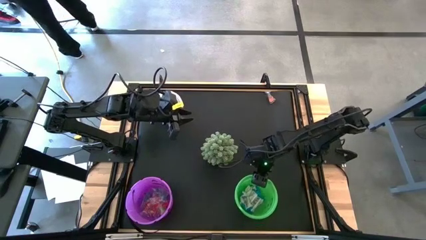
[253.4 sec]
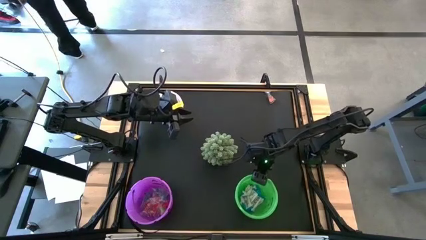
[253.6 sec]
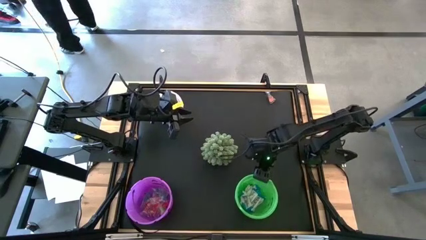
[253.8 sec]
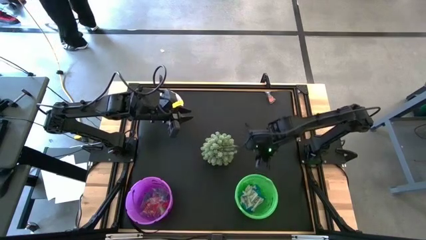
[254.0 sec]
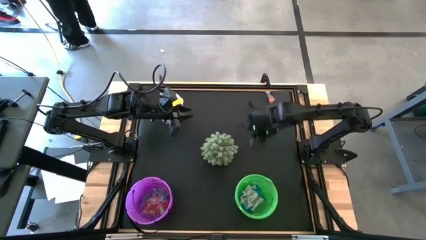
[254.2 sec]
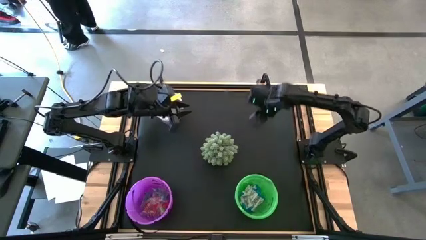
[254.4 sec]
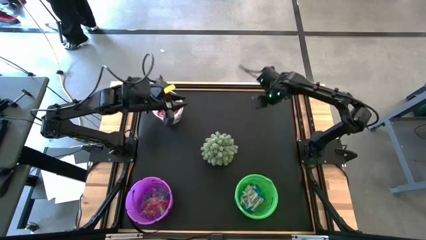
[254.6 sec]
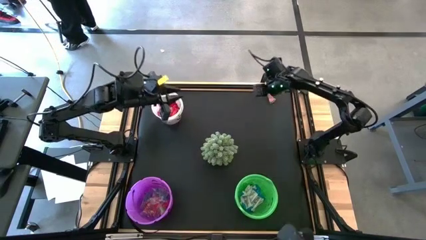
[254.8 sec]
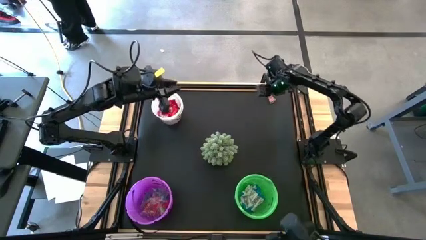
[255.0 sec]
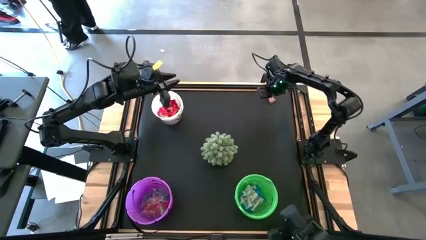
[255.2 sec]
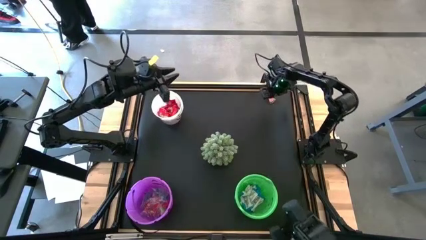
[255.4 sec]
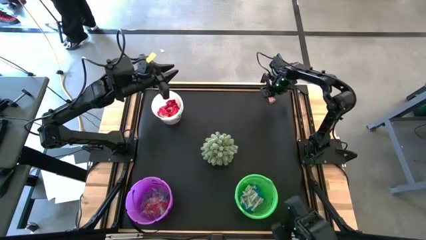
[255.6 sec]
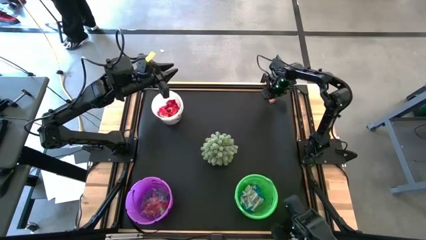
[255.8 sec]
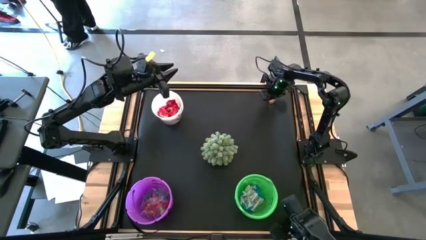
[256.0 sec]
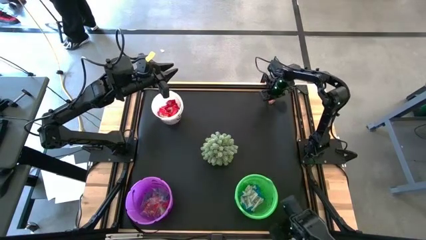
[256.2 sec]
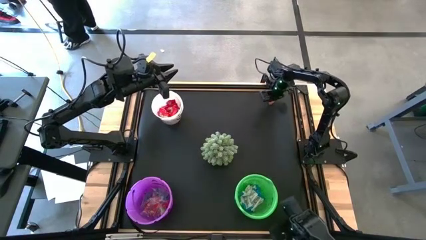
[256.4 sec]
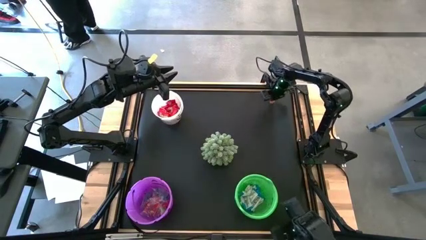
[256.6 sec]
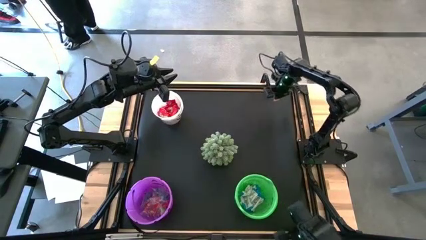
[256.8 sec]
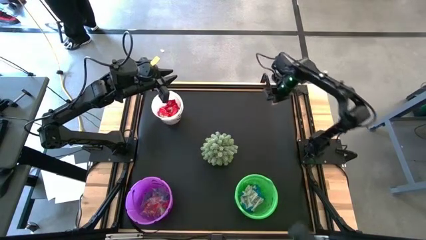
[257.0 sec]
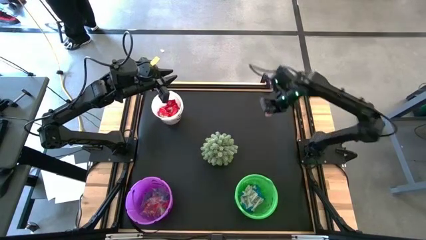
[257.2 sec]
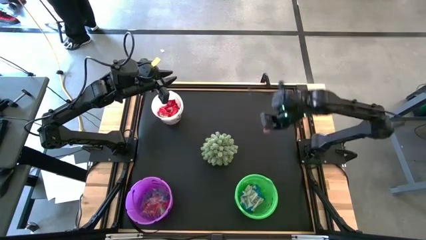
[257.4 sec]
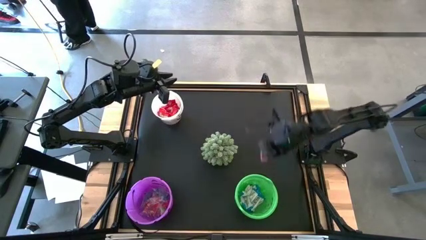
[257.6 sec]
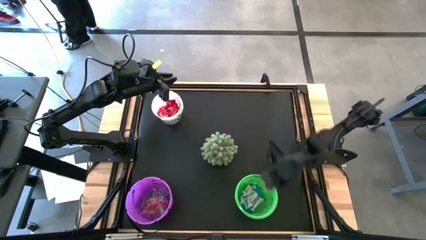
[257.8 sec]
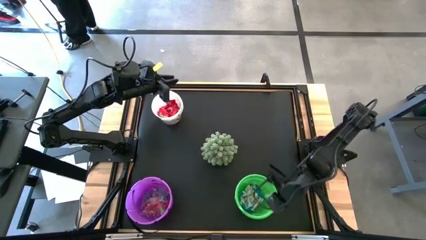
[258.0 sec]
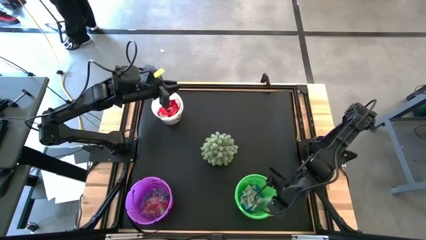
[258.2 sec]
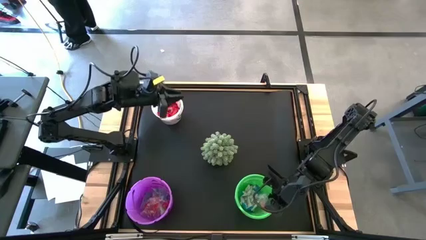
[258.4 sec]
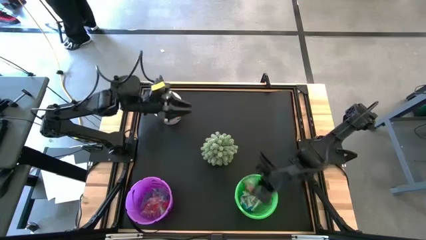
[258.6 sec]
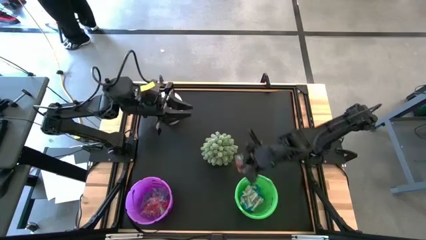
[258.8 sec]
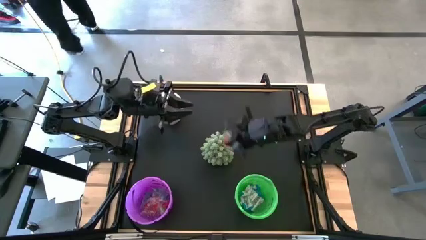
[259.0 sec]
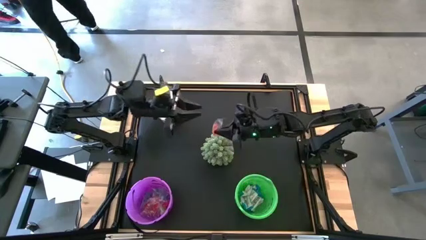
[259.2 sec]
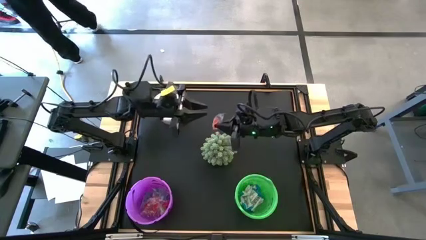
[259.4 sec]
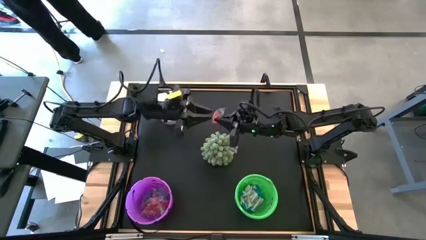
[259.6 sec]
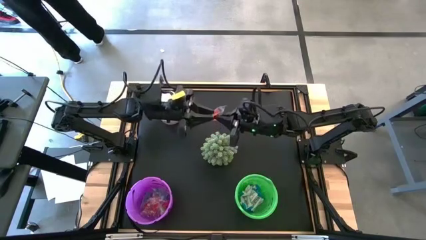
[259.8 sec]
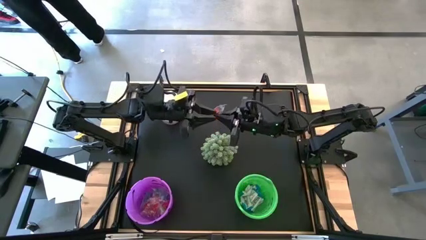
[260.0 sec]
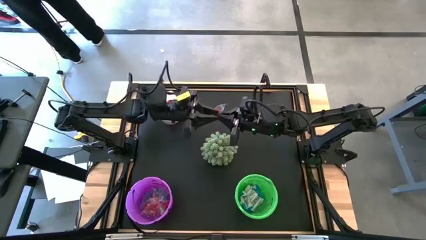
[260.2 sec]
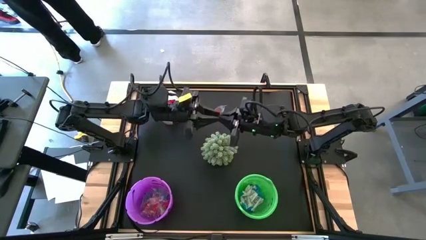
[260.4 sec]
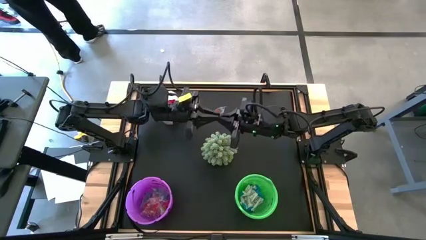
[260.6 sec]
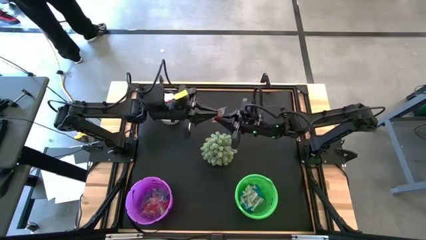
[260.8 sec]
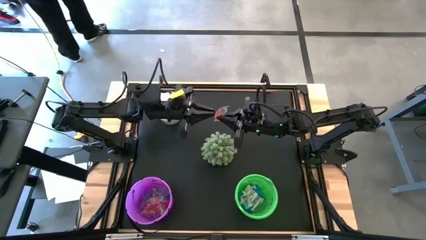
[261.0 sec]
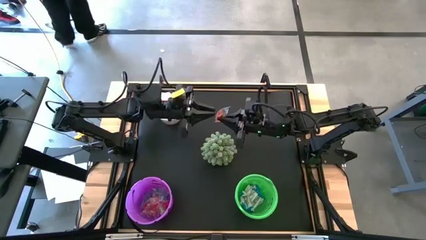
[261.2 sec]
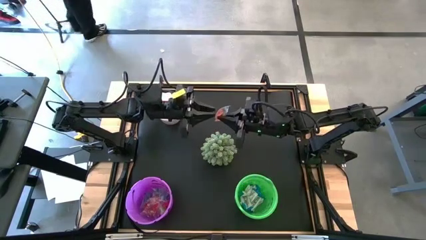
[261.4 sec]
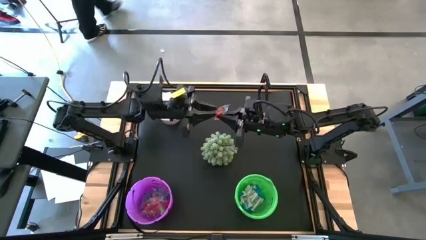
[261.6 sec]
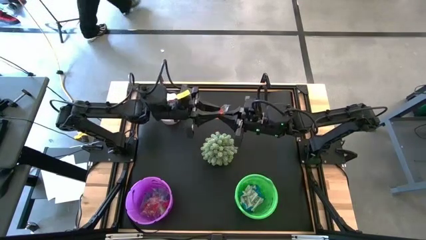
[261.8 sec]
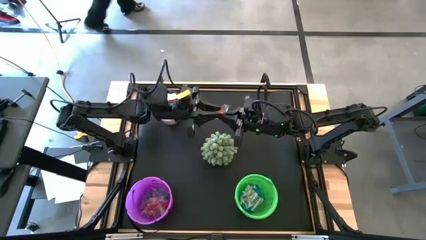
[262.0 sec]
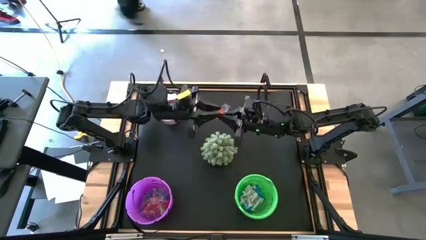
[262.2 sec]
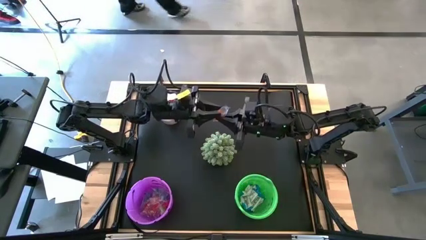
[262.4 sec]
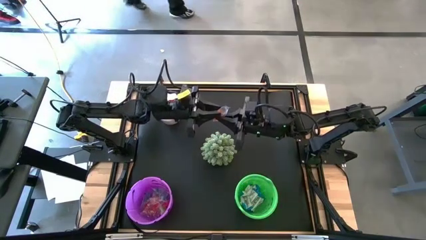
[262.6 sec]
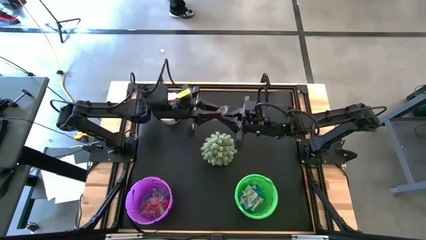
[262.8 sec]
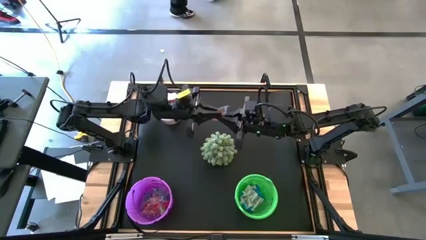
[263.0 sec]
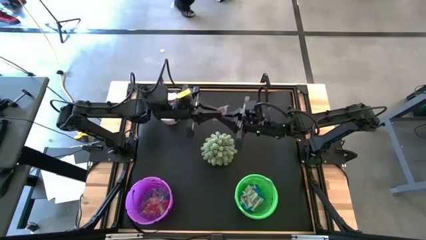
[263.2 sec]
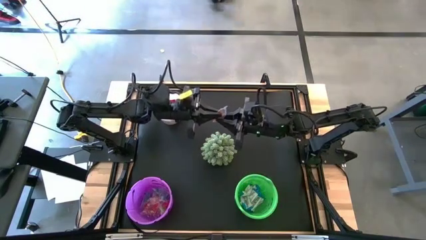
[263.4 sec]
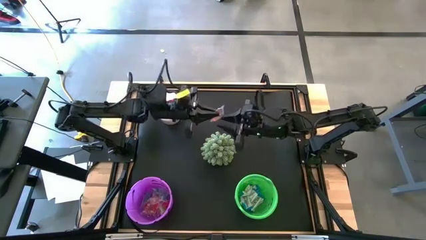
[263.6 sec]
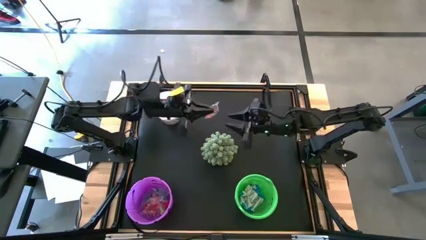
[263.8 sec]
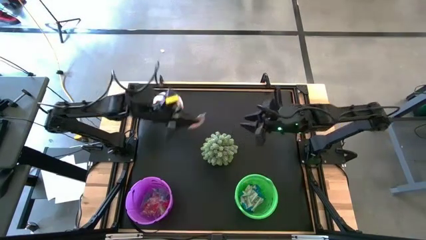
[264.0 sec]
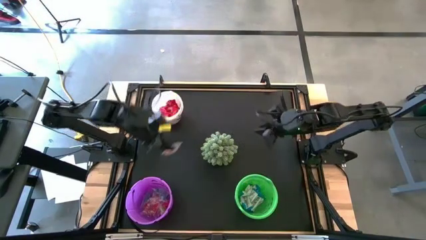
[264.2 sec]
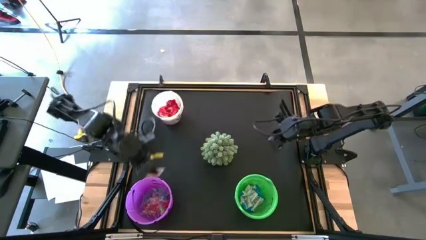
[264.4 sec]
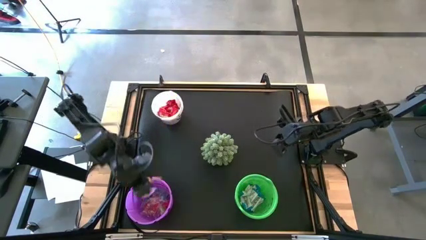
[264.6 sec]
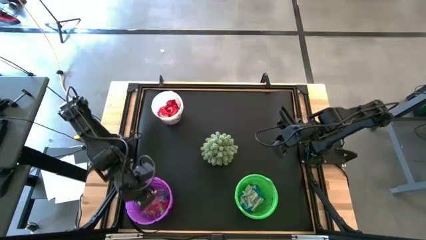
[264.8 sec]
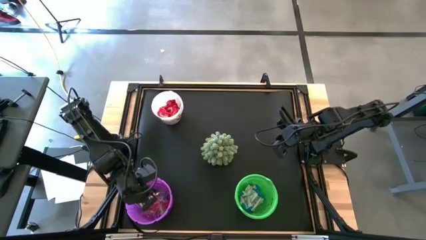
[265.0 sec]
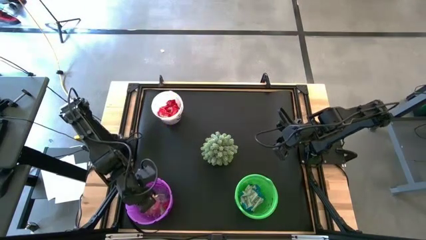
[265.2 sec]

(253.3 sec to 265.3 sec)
Task: Organize candy in baskets
Put the orange gummy into the purple bucket
